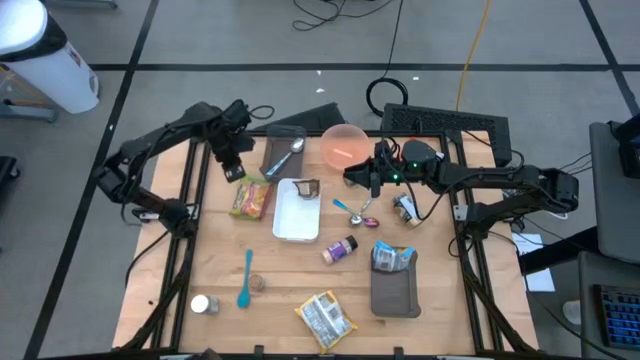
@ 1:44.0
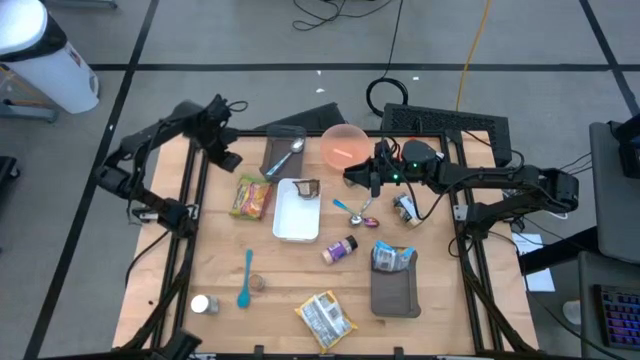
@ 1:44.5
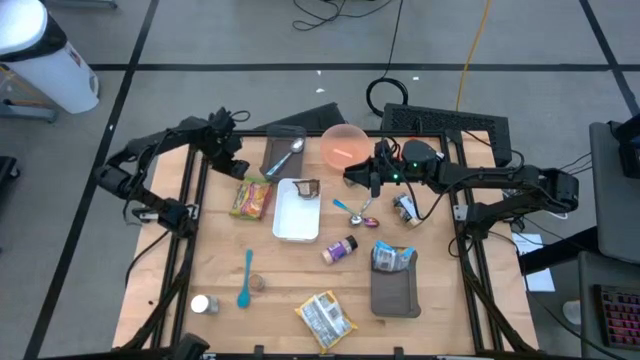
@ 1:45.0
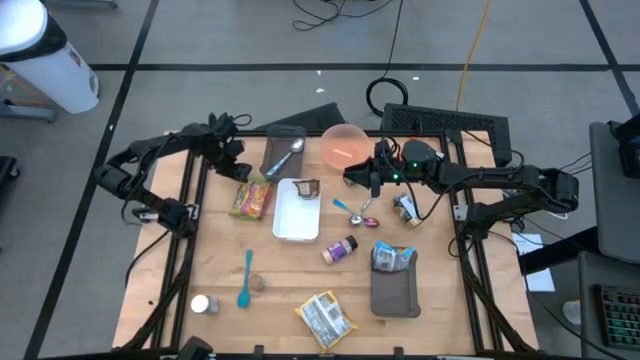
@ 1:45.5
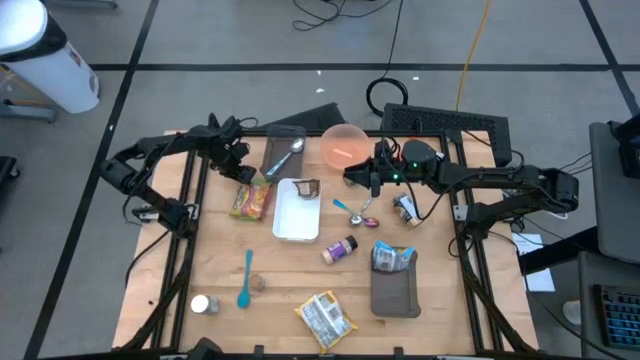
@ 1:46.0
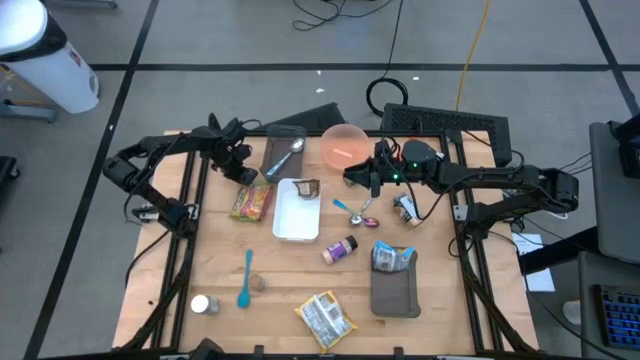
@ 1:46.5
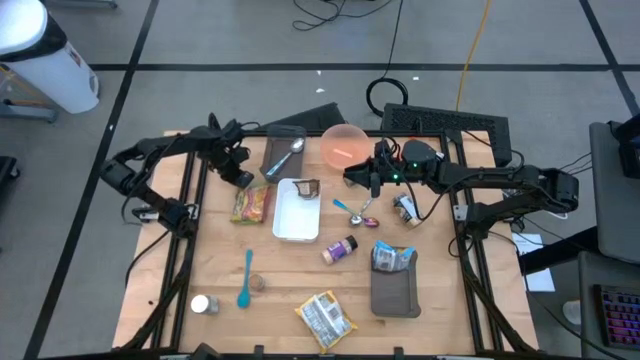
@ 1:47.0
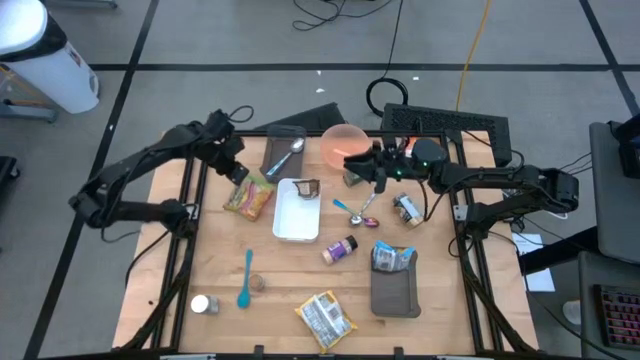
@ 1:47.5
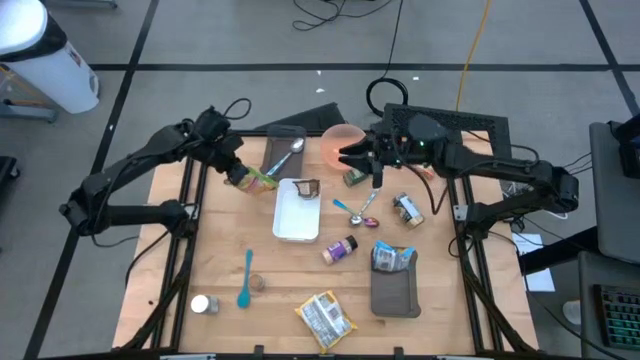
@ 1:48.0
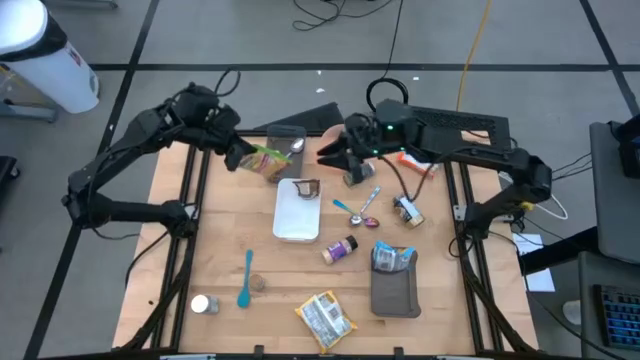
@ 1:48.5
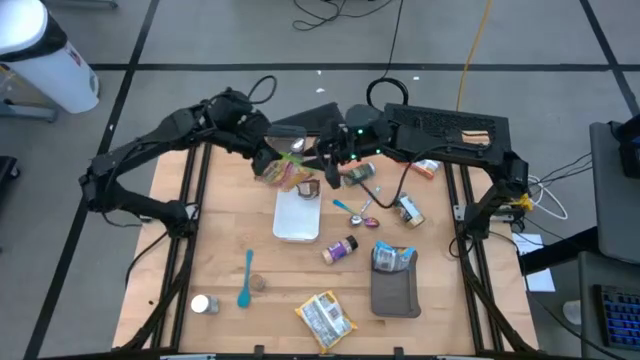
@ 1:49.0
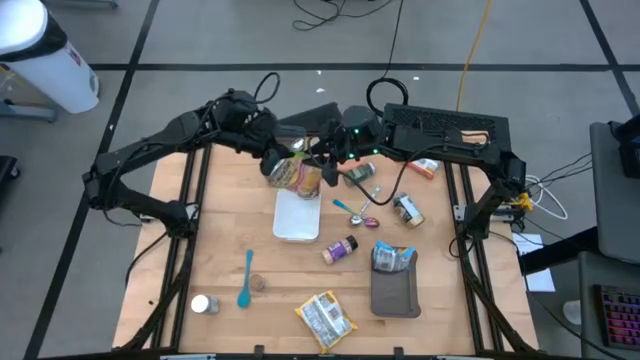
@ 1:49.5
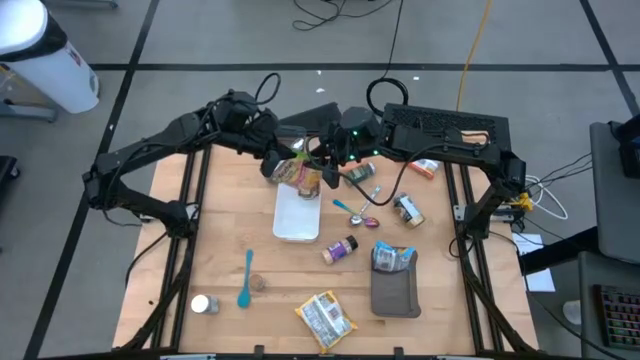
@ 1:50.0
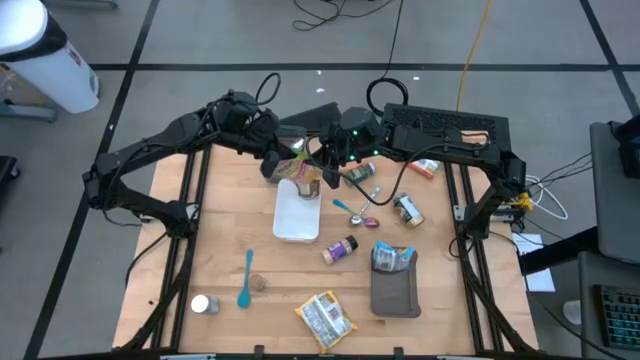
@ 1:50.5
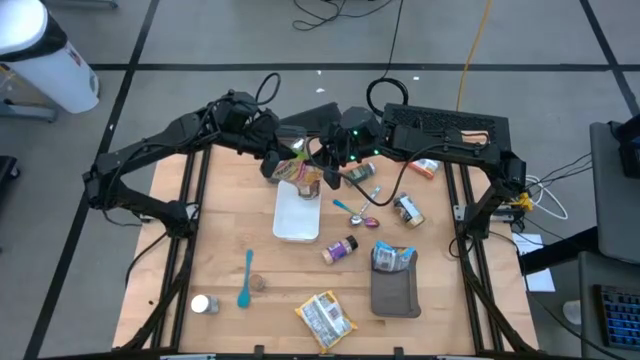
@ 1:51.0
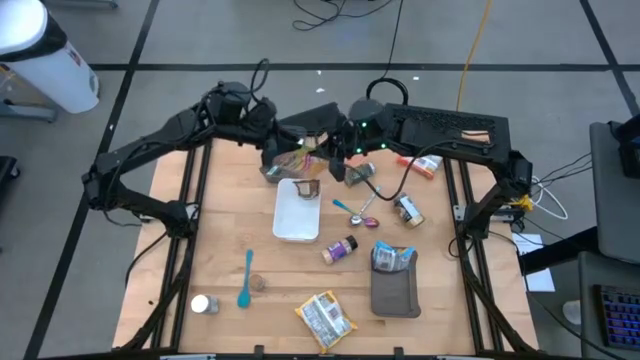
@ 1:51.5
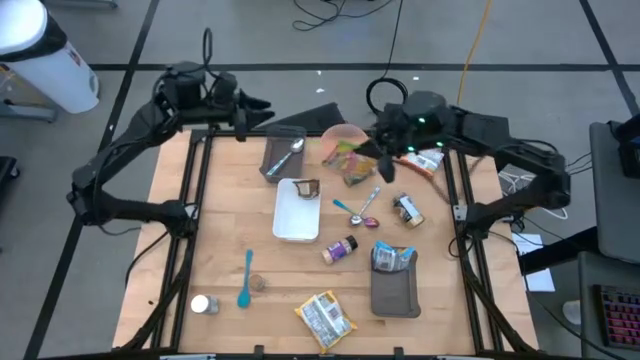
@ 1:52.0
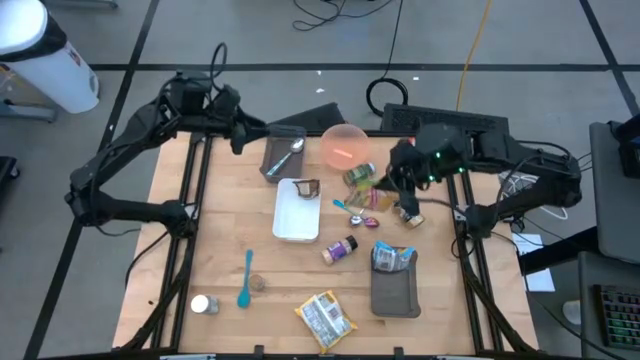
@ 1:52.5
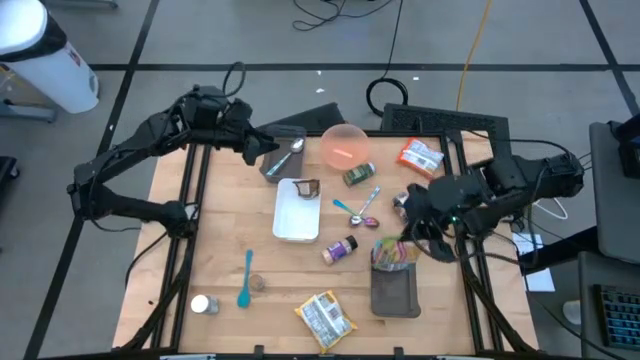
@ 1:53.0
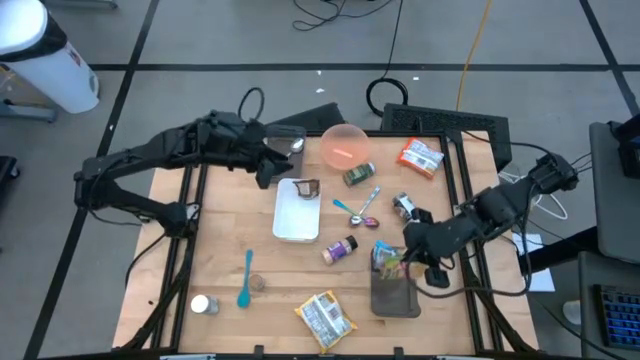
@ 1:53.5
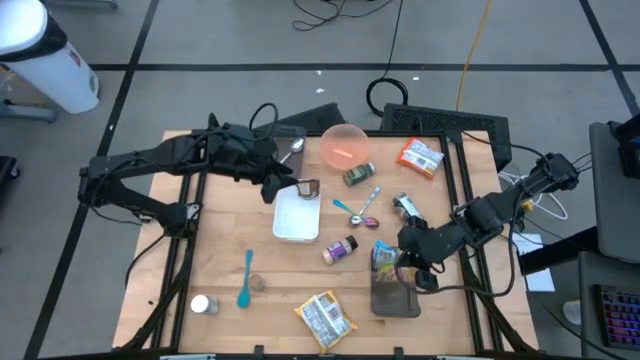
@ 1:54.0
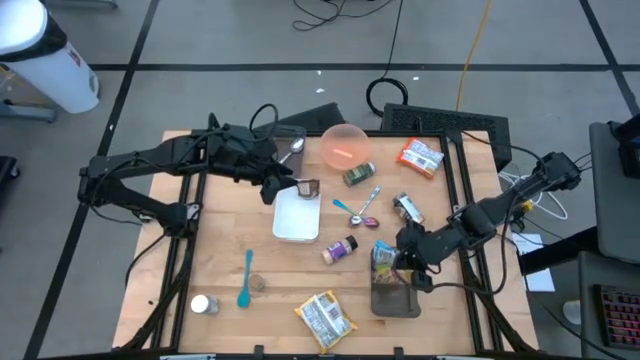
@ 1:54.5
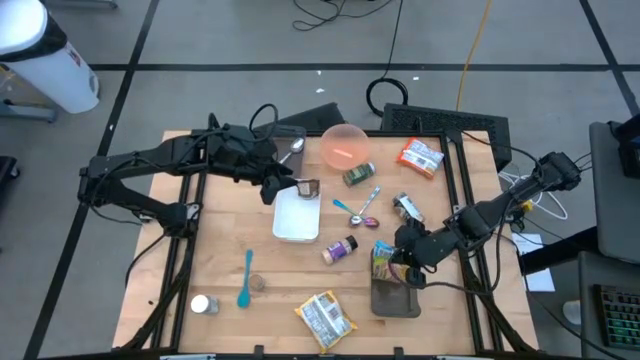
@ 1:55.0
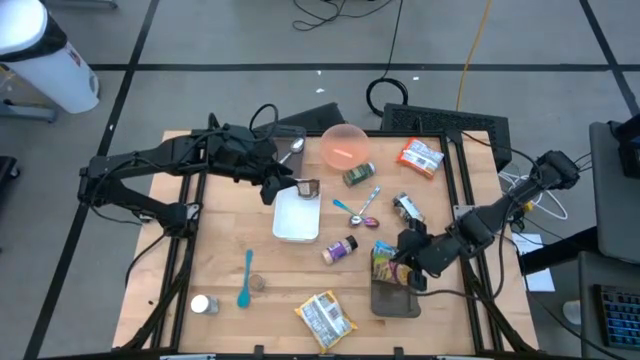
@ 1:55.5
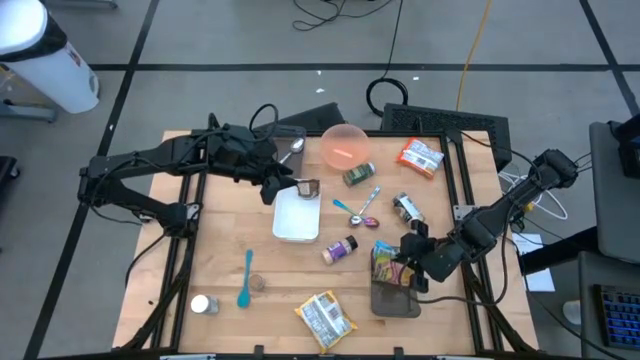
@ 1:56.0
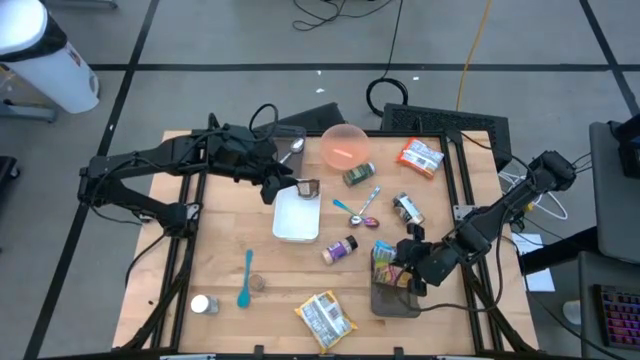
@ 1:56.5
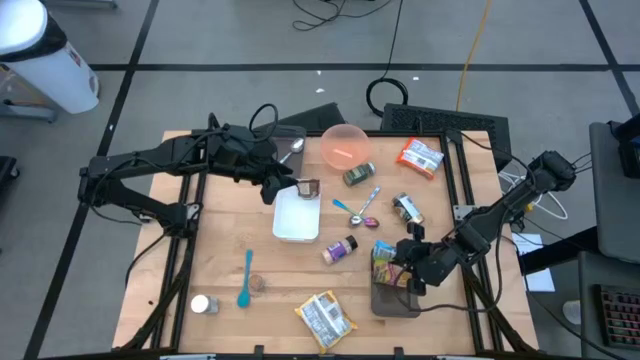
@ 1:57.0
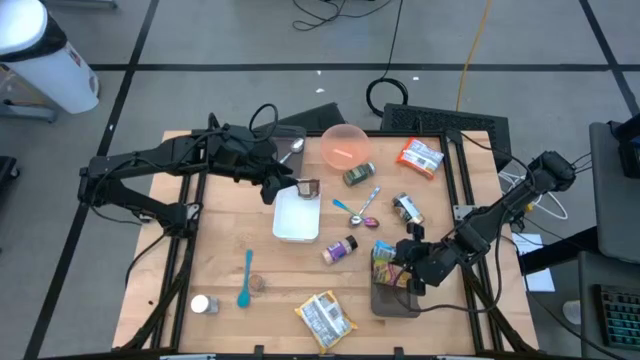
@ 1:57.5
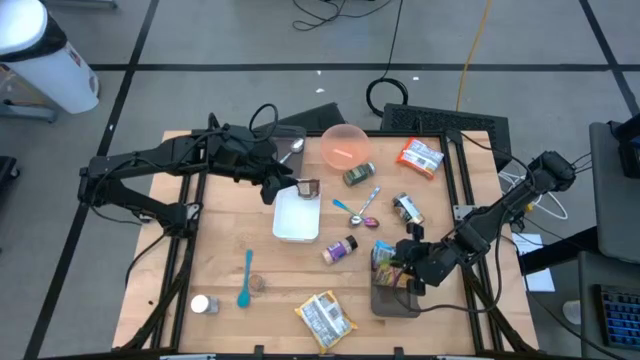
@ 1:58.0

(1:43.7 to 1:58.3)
Task: Pick & Place Food Item
Put the green noodle pack into the bottom black transparent bin

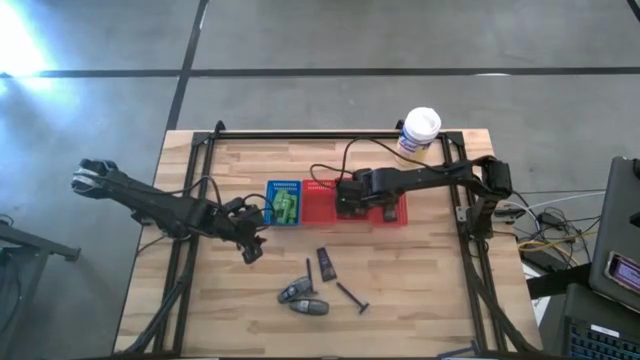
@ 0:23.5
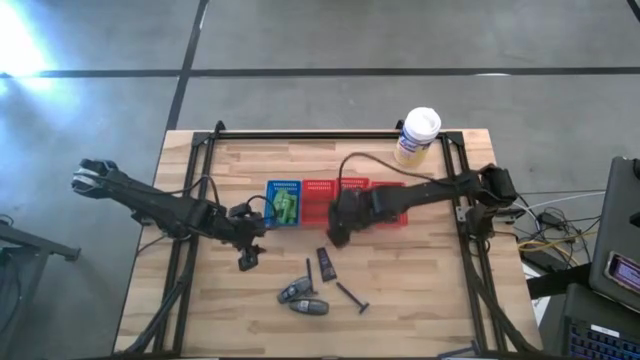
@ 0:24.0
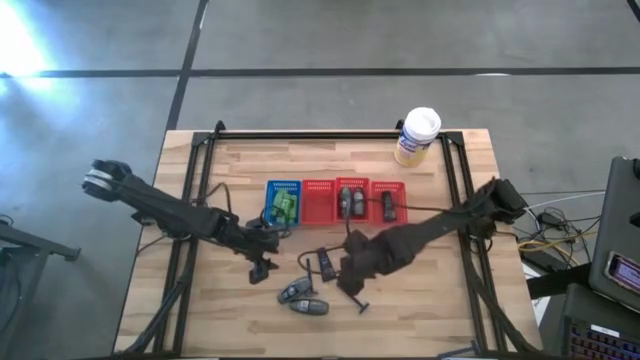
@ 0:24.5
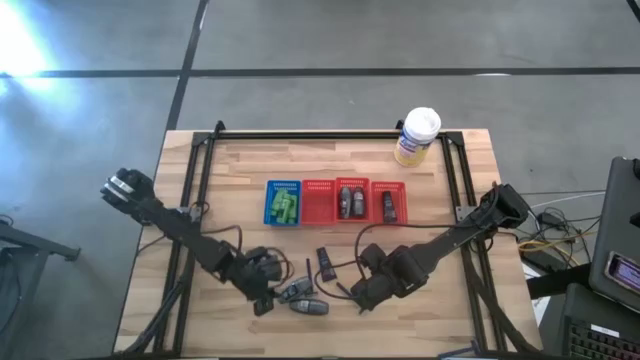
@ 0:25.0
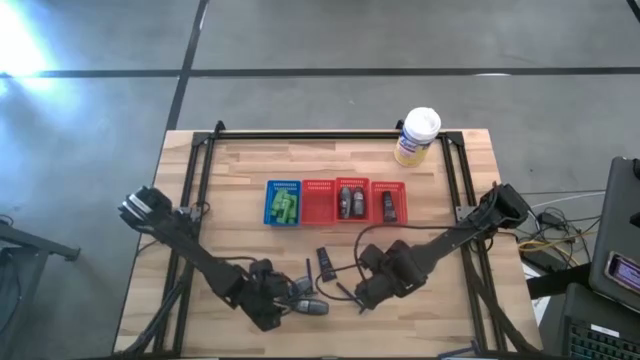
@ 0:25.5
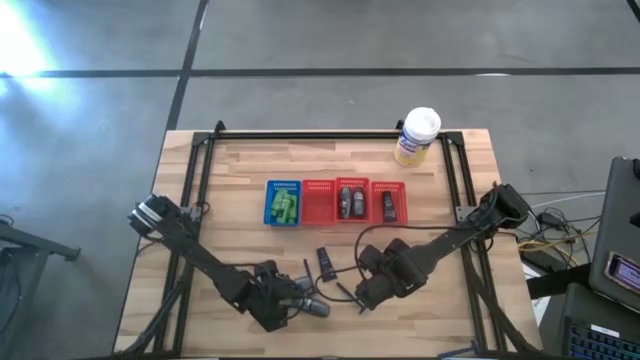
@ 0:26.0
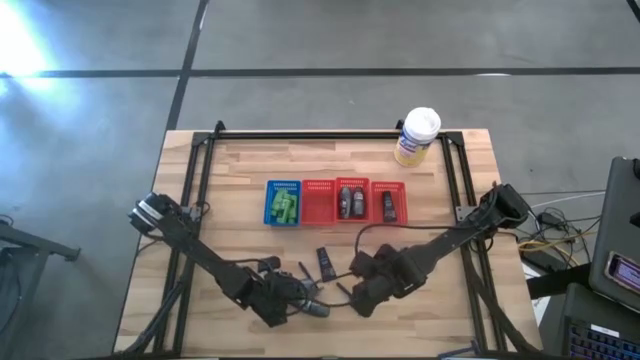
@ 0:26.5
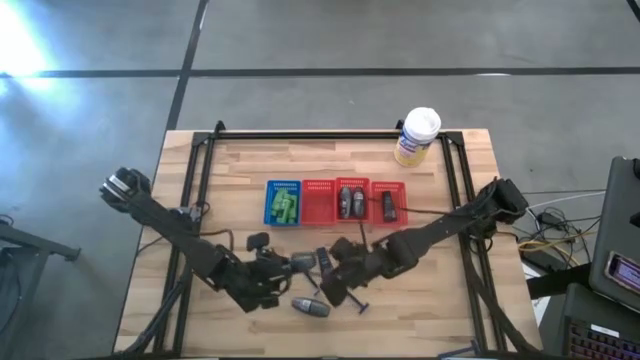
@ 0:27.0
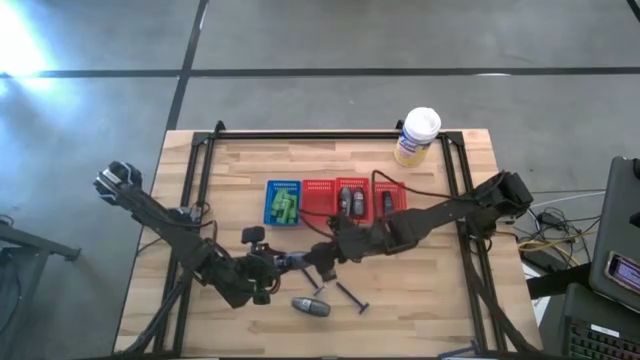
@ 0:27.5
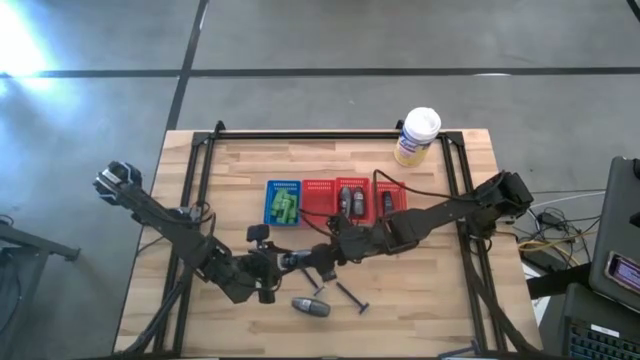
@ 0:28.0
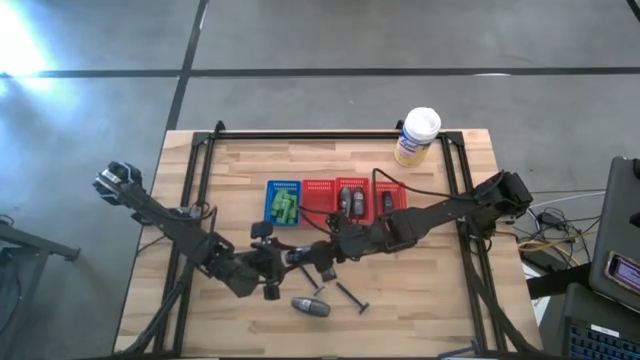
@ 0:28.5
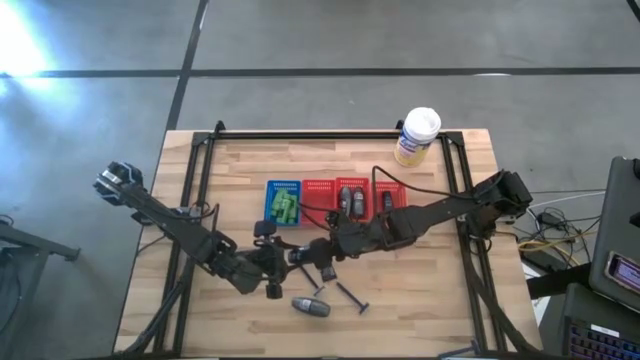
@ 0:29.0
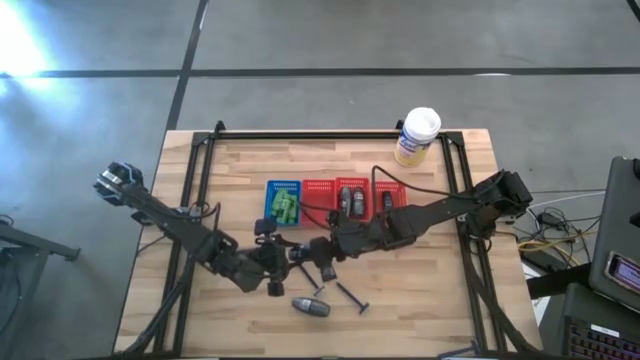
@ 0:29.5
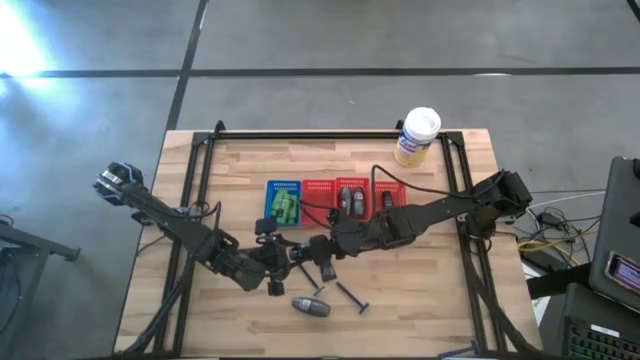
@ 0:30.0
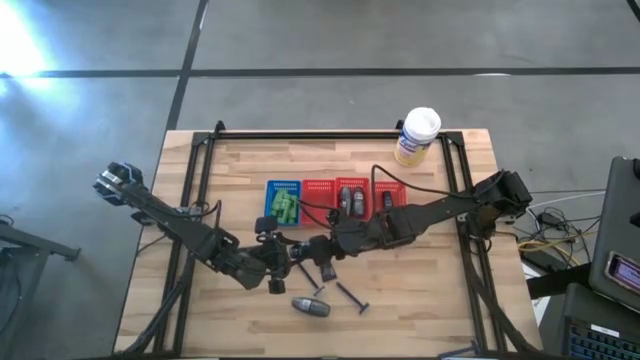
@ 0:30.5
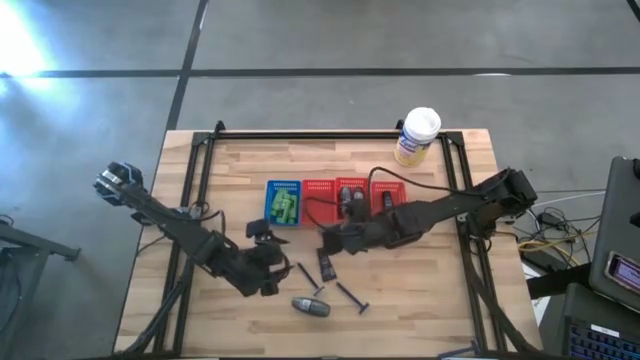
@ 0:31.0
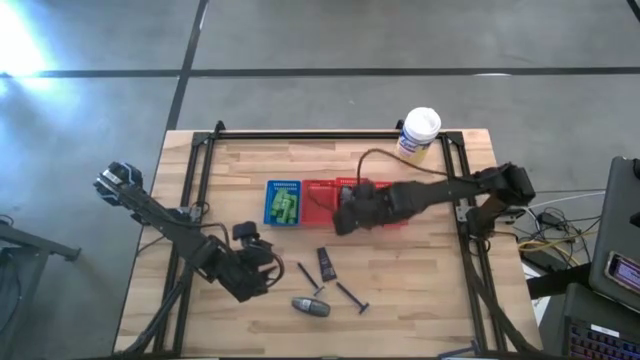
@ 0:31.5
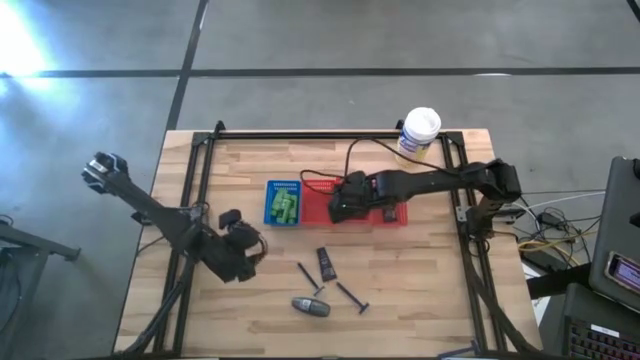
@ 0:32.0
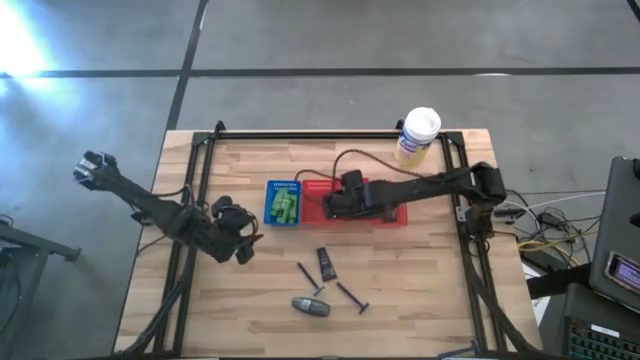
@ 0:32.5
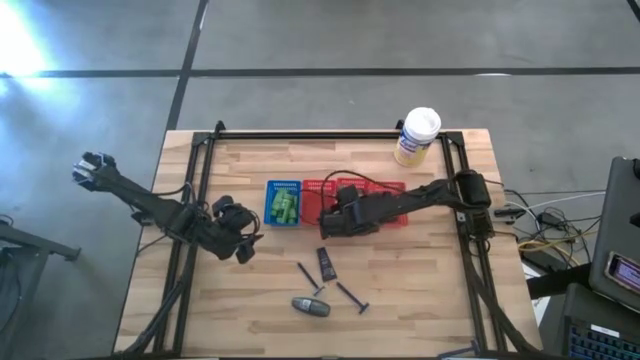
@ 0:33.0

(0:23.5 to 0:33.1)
Task: Pick & Place Travel size toiletries
Put the gray deodorant into the middle red bin
